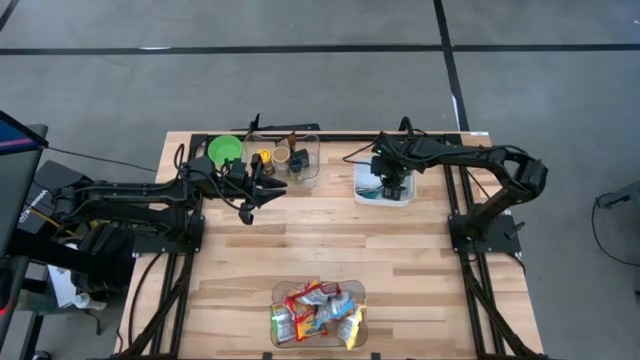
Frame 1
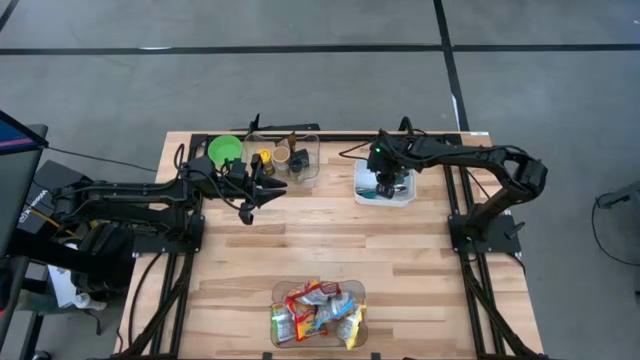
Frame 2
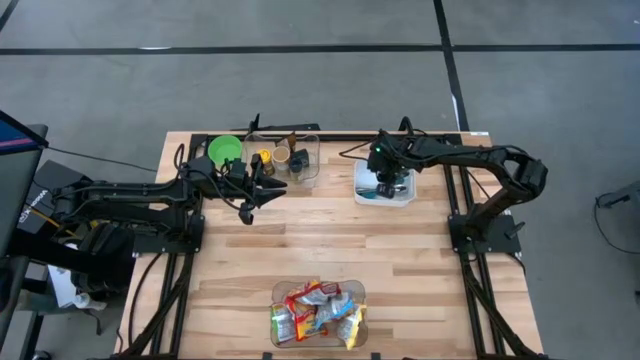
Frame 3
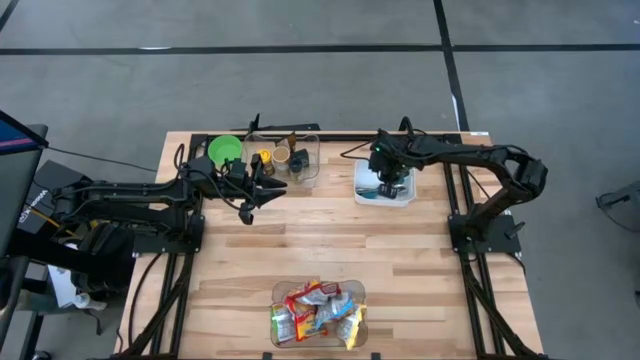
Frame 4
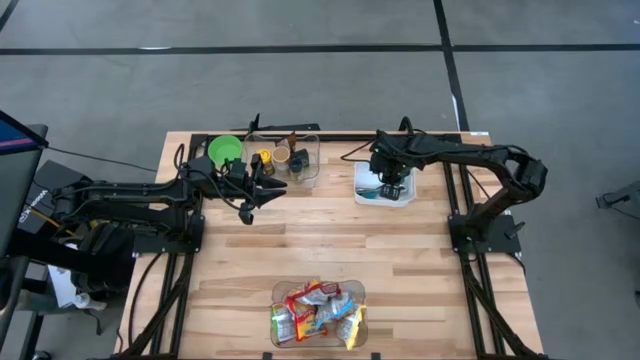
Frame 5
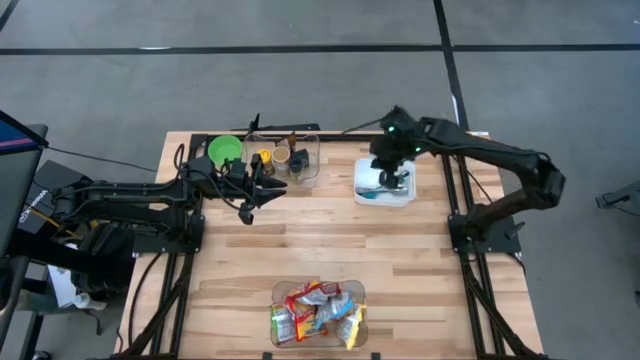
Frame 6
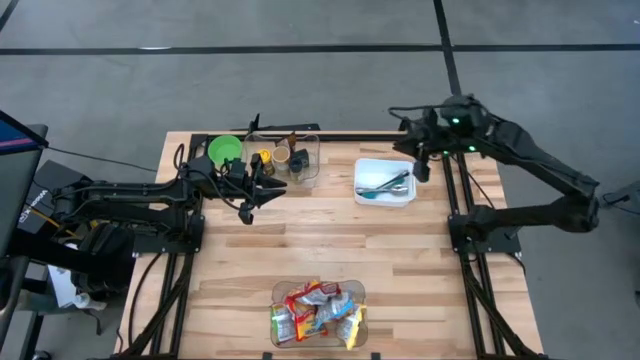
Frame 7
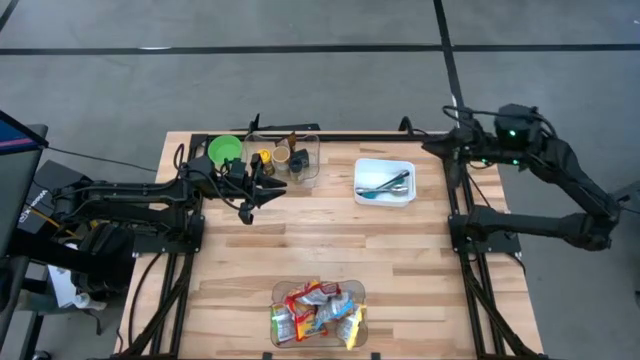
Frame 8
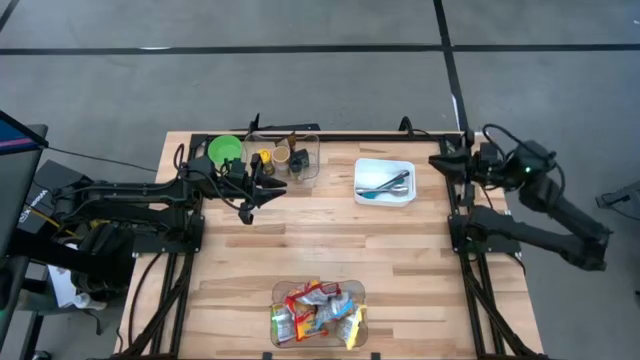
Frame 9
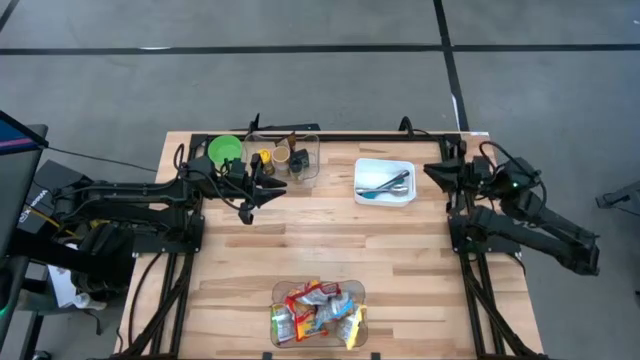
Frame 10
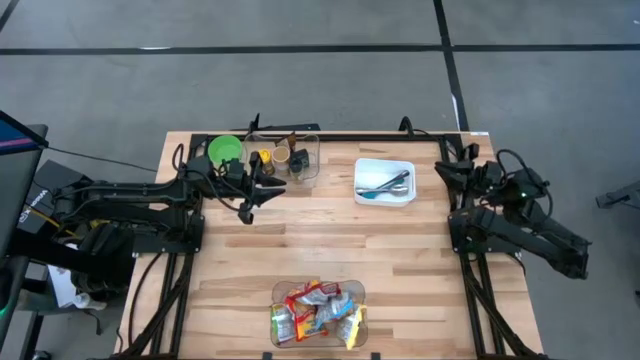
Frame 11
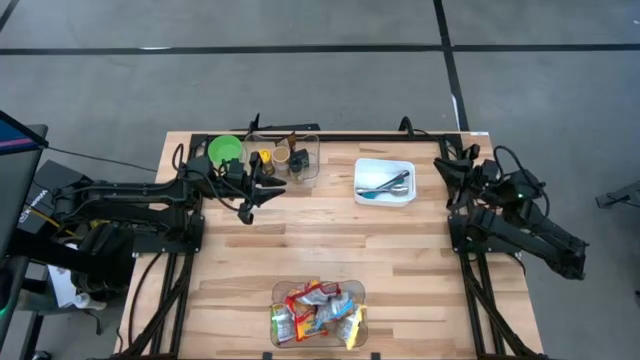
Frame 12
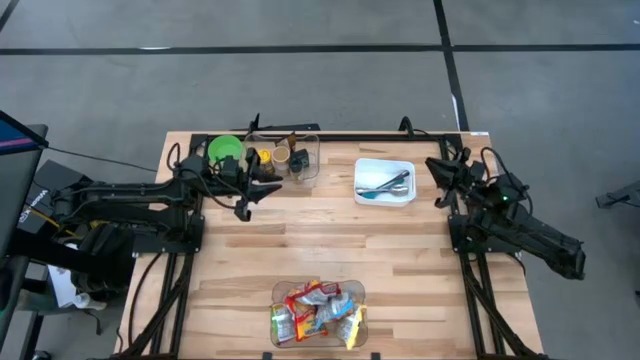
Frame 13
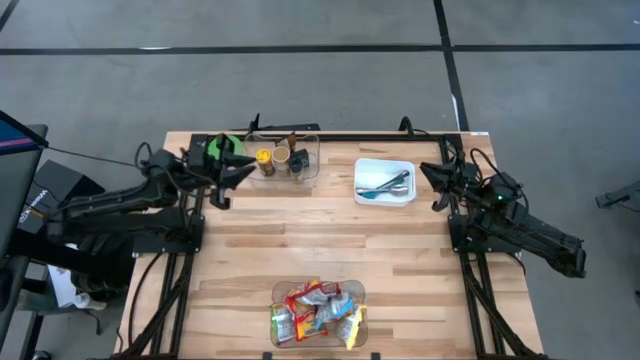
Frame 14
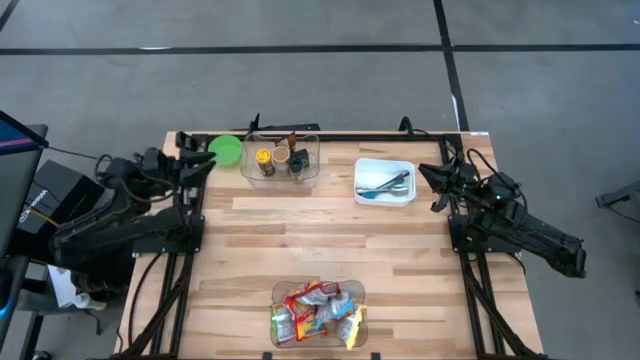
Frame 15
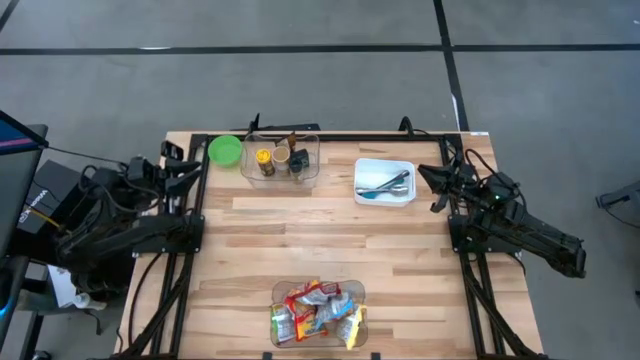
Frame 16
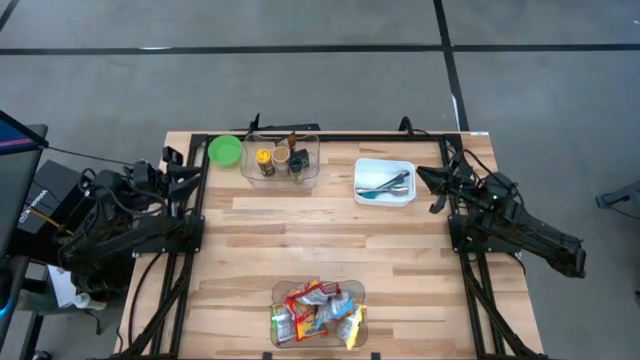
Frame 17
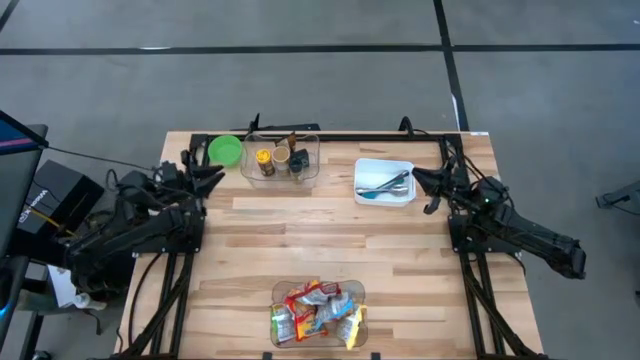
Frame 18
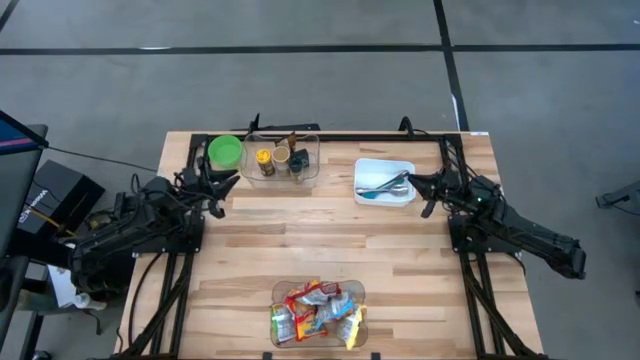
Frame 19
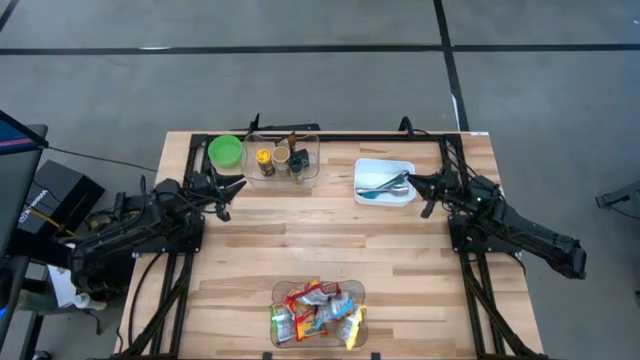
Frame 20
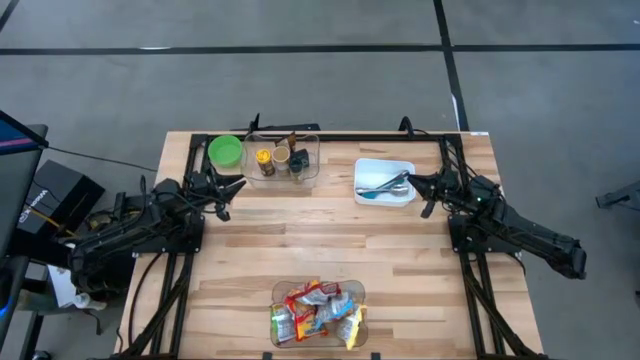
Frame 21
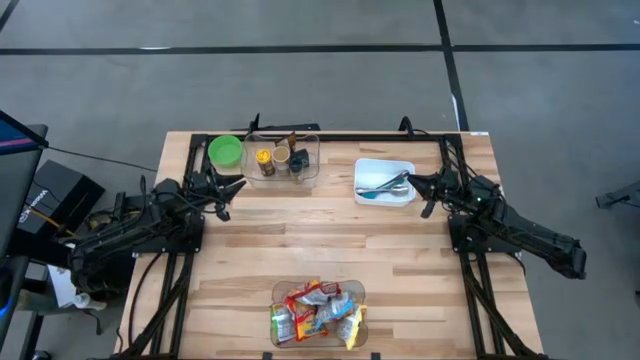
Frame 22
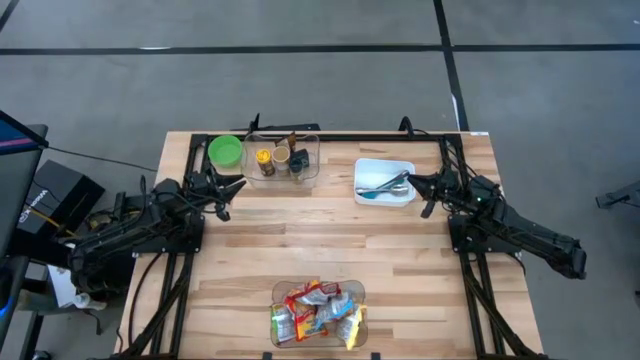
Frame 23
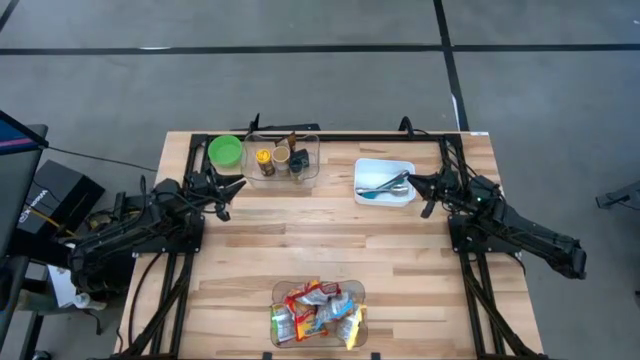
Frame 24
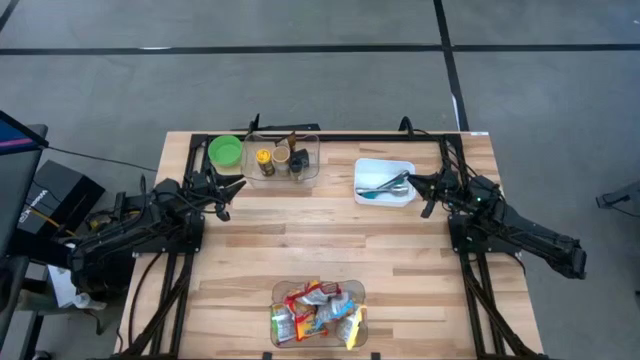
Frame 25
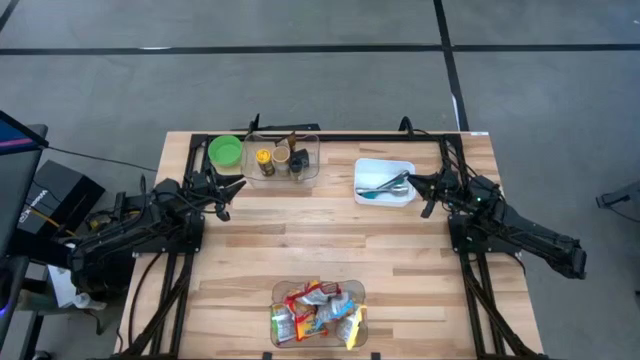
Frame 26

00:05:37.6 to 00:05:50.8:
Task: Pick & Place Food Item
Return to Home Position

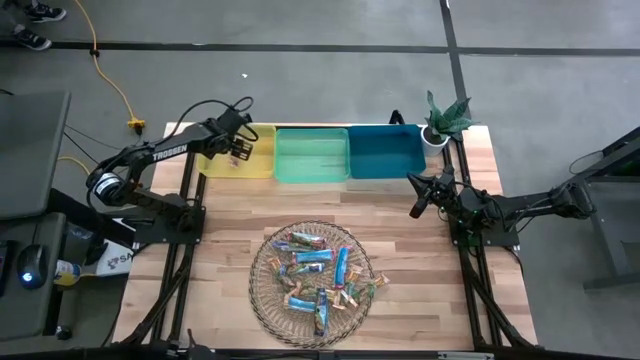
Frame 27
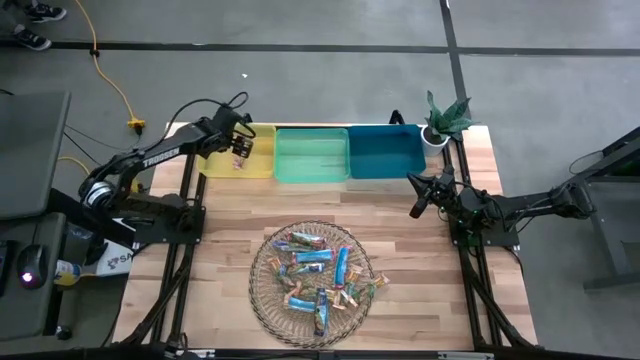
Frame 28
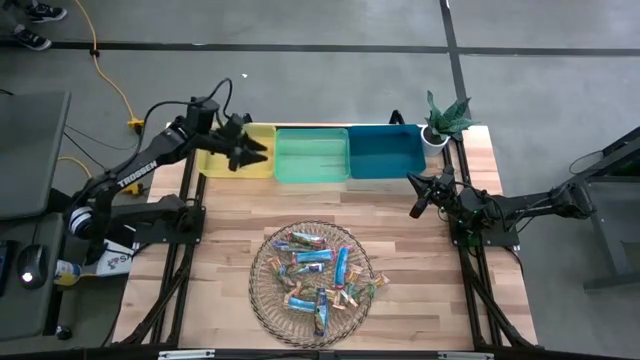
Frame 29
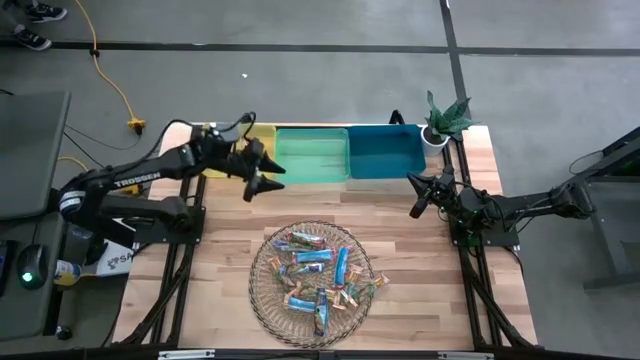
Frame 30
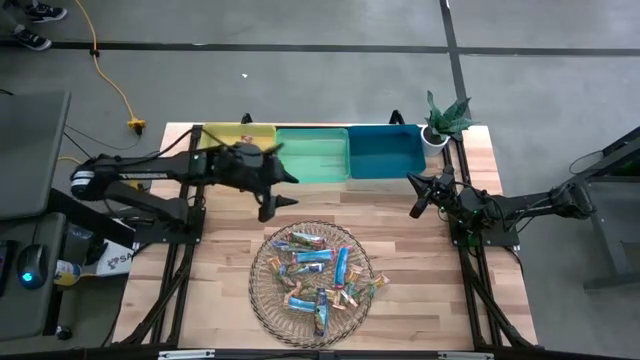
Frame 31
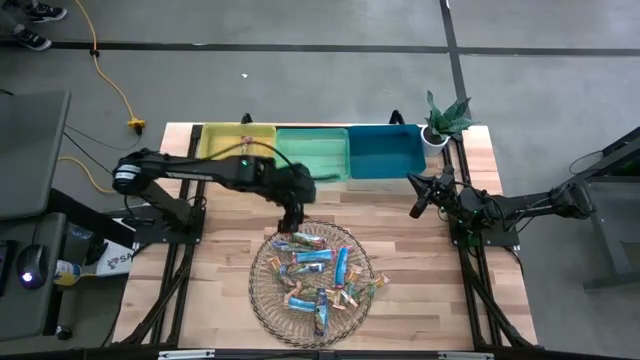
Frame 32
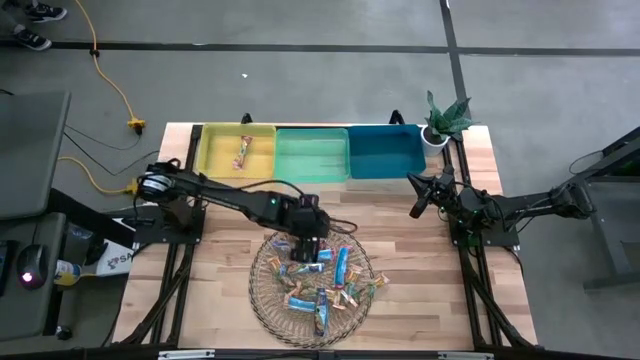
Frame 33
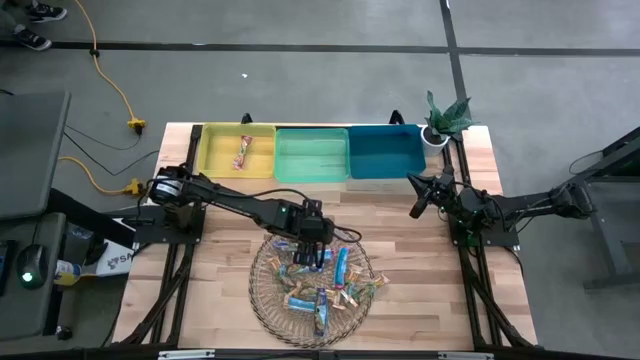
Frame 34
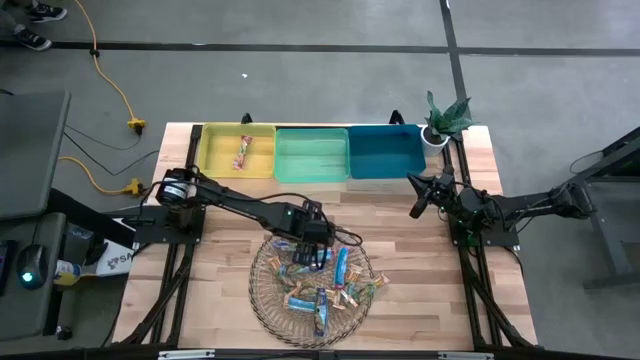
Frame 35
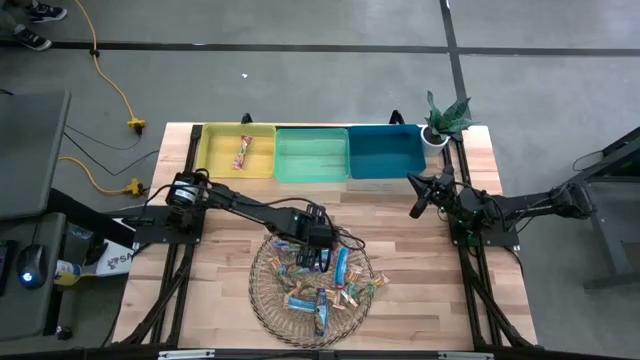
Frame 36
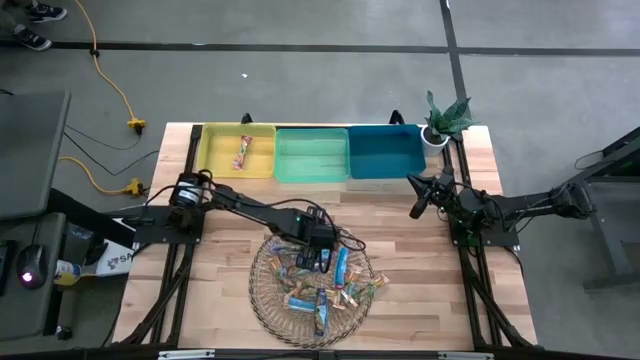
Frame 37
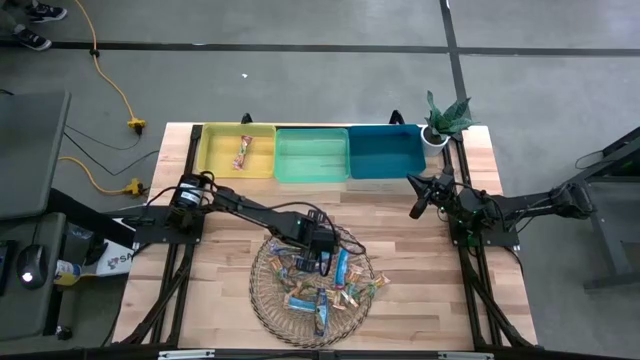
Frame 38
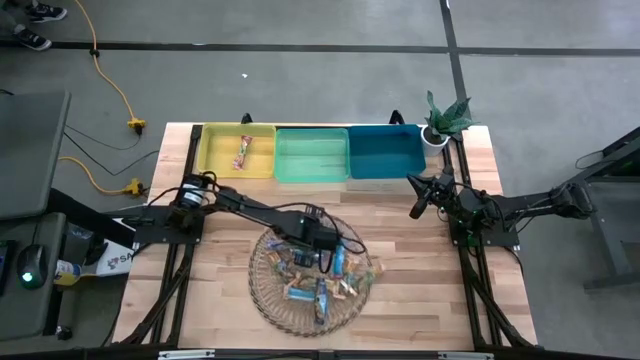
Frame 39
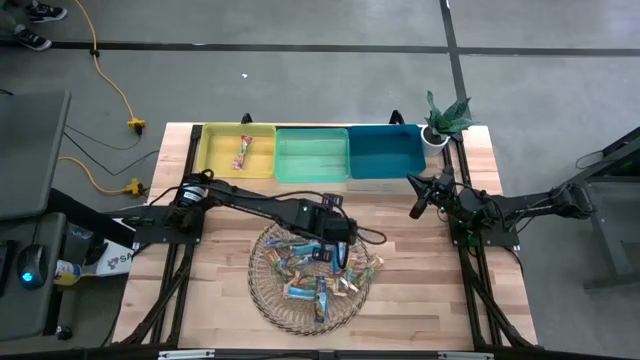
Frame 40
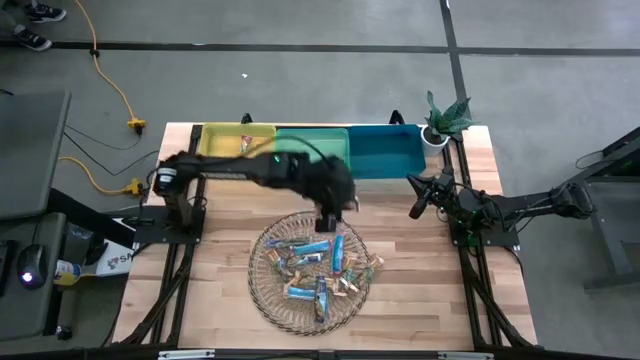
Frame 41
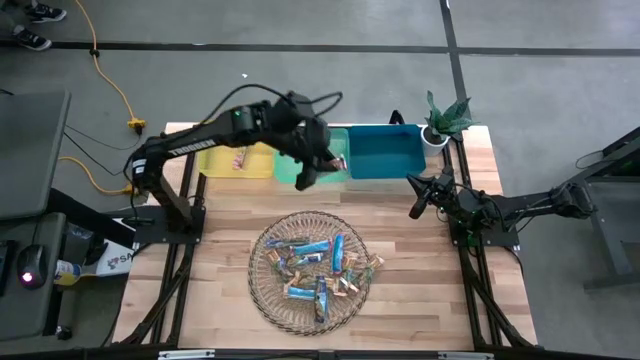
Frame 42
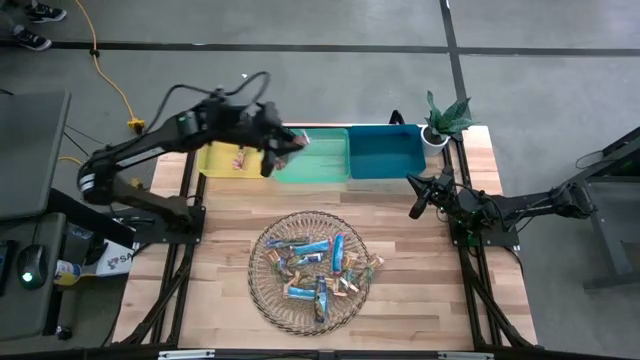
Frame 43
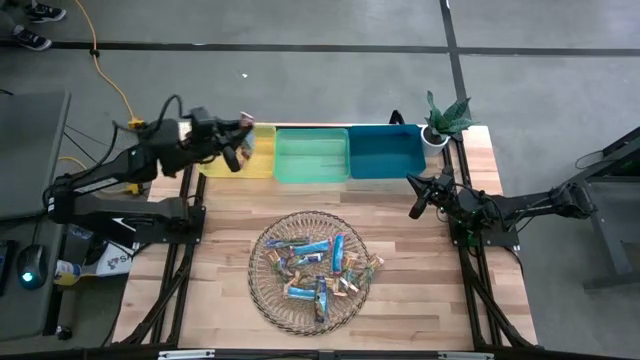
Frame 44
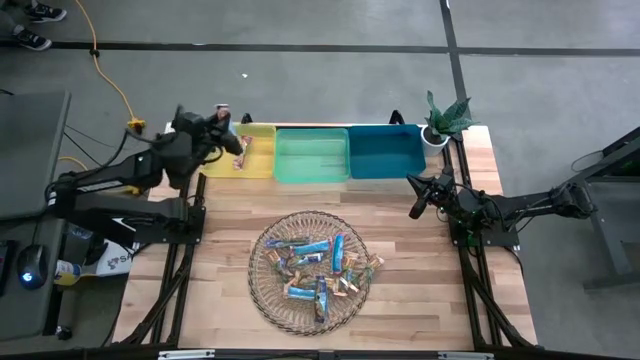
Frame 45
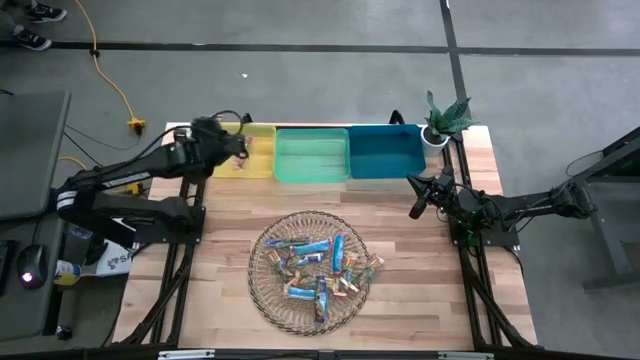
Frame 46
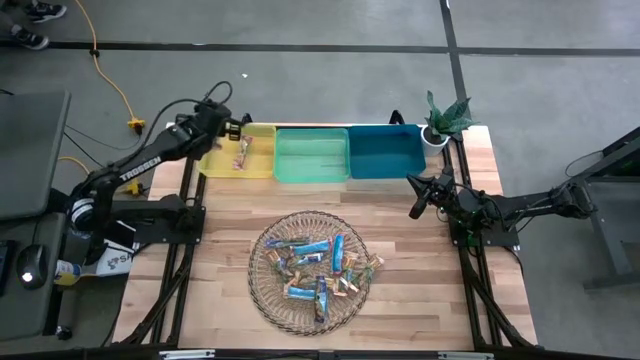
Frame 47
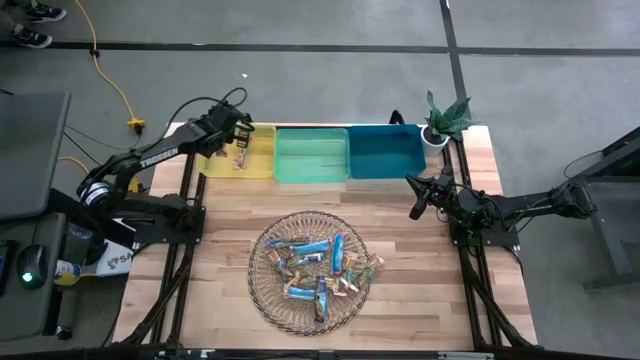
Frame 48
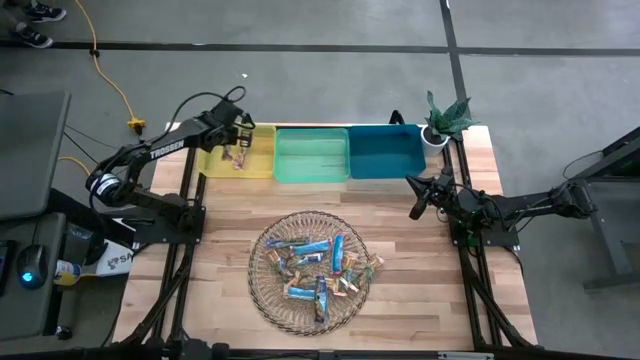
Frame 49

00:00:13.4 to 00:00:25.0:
Task: Pick and place Granola Bars by type
Put the red granola bar into the yellow bin
